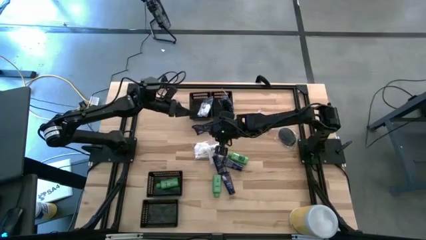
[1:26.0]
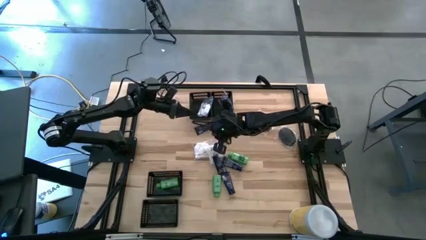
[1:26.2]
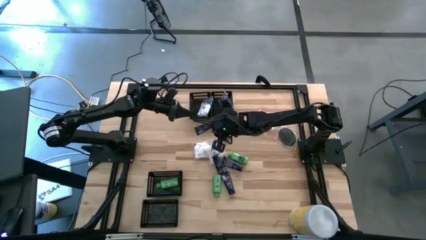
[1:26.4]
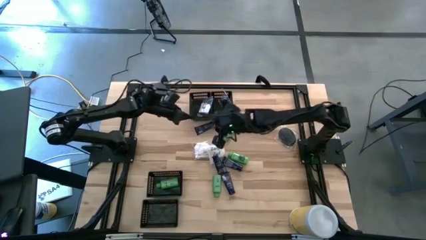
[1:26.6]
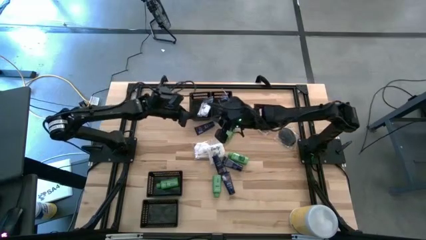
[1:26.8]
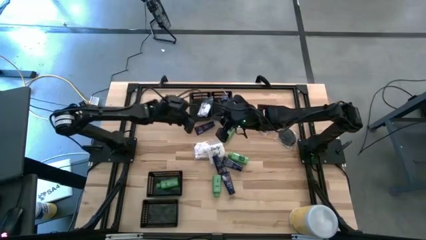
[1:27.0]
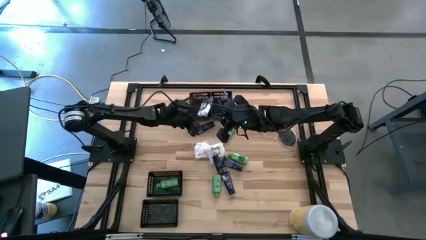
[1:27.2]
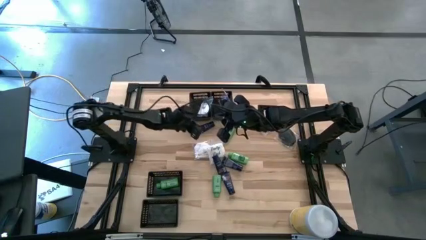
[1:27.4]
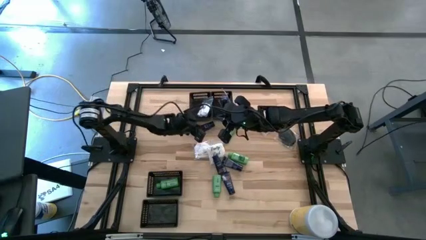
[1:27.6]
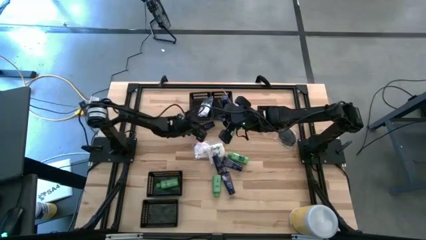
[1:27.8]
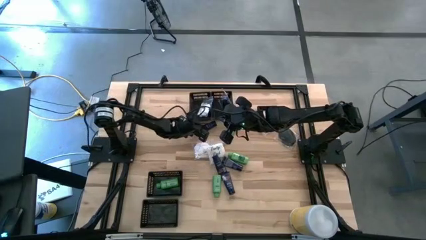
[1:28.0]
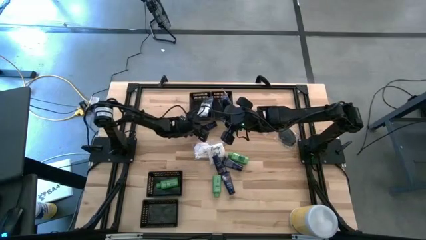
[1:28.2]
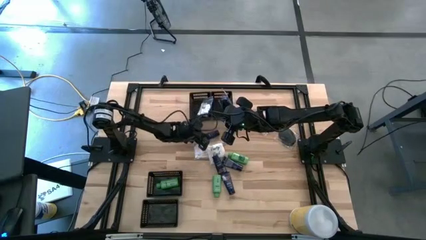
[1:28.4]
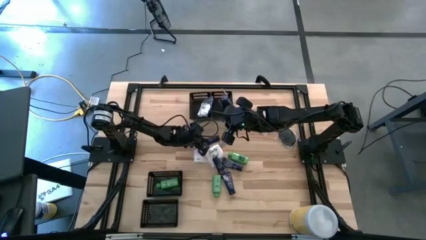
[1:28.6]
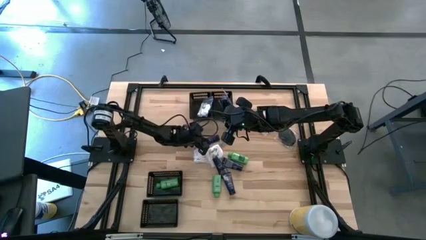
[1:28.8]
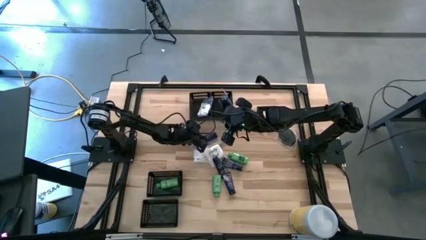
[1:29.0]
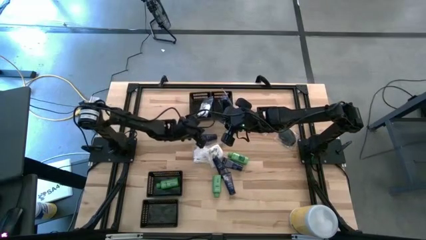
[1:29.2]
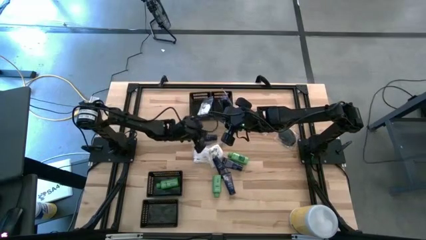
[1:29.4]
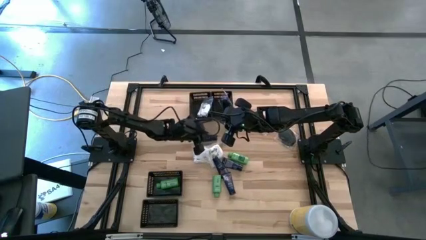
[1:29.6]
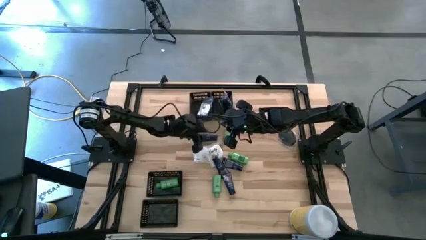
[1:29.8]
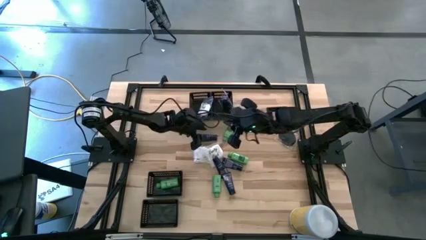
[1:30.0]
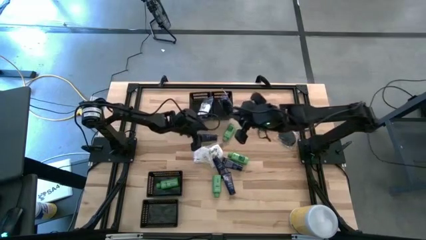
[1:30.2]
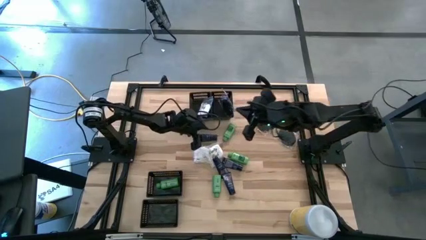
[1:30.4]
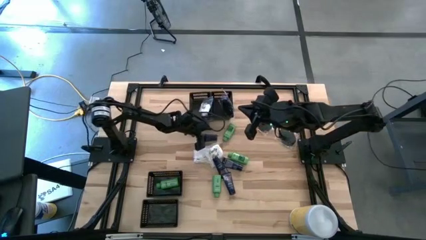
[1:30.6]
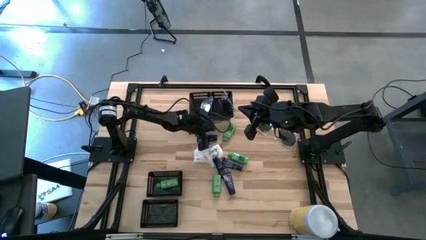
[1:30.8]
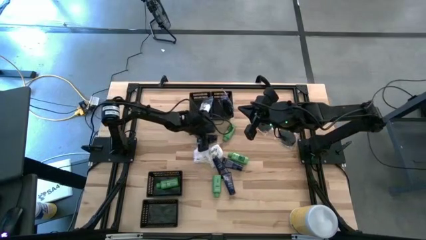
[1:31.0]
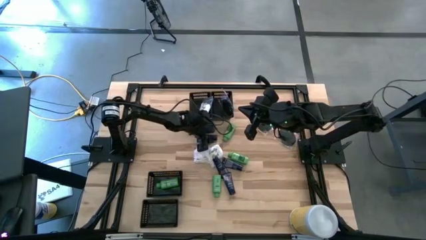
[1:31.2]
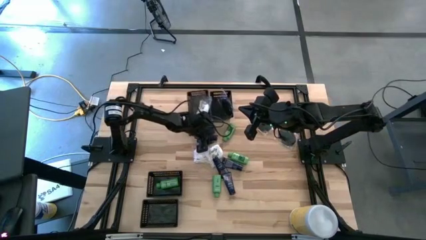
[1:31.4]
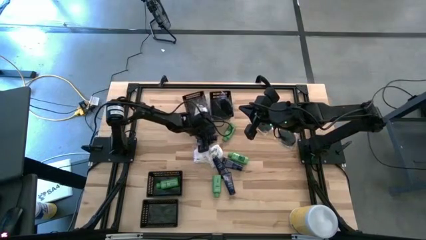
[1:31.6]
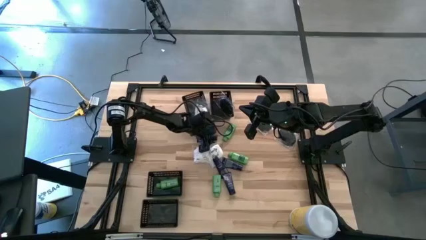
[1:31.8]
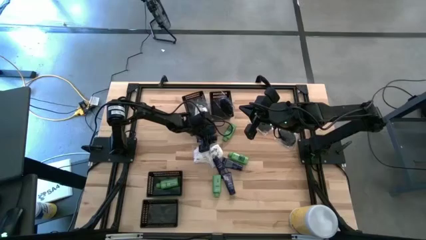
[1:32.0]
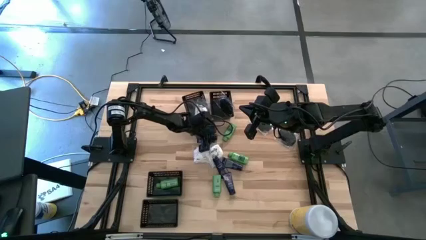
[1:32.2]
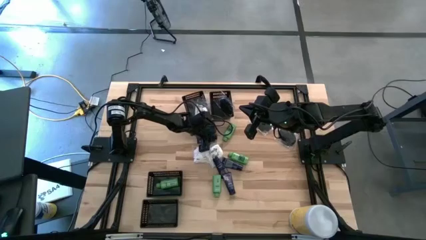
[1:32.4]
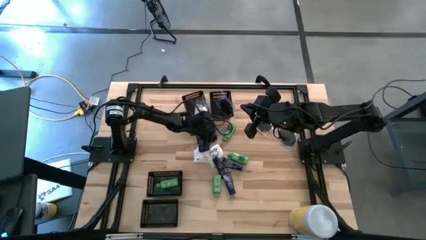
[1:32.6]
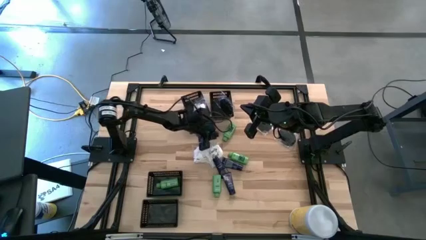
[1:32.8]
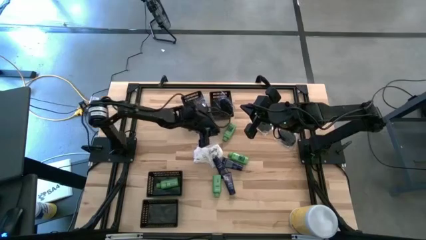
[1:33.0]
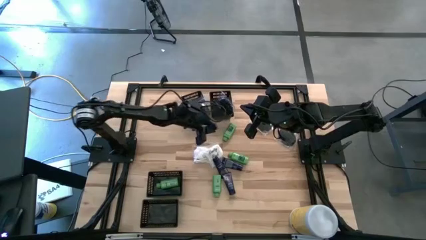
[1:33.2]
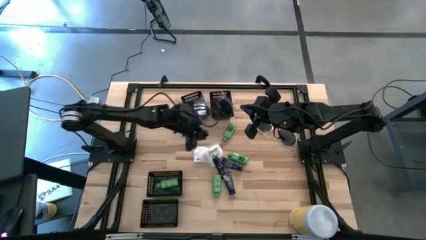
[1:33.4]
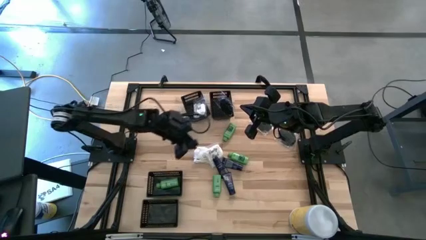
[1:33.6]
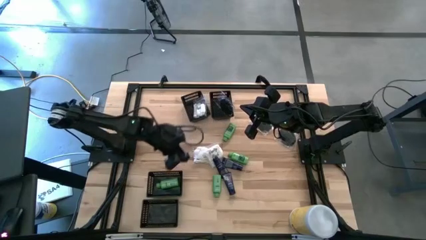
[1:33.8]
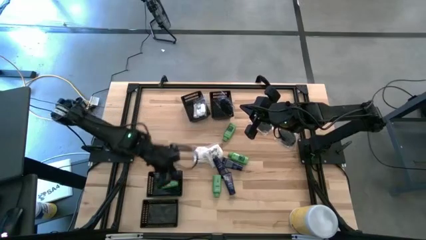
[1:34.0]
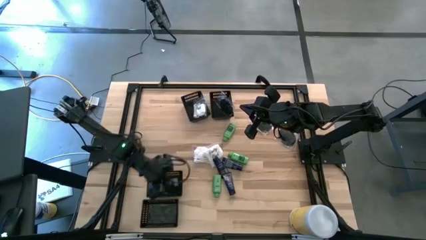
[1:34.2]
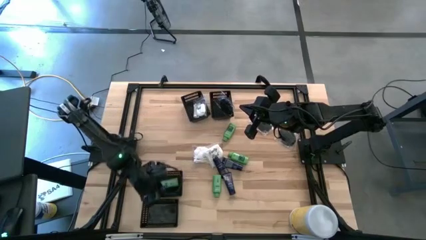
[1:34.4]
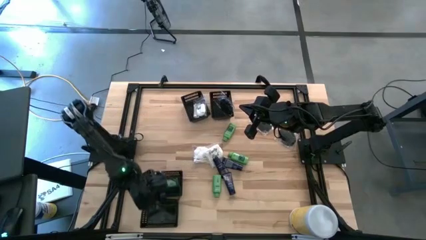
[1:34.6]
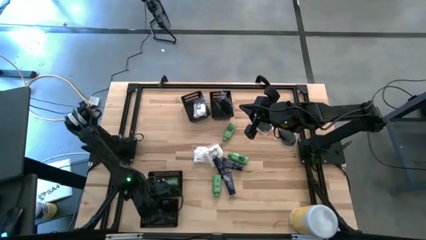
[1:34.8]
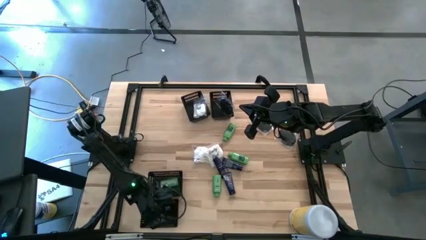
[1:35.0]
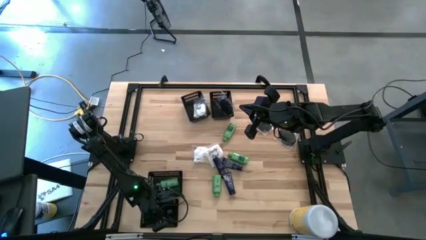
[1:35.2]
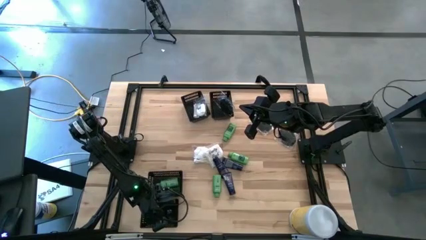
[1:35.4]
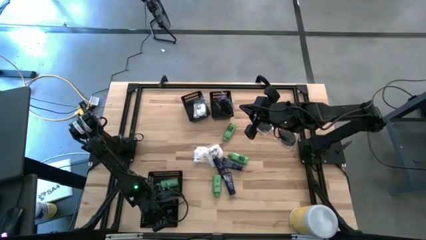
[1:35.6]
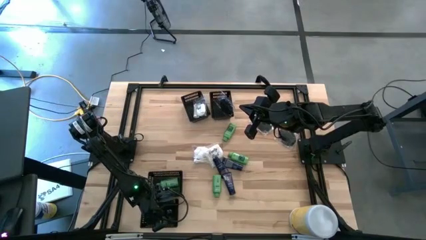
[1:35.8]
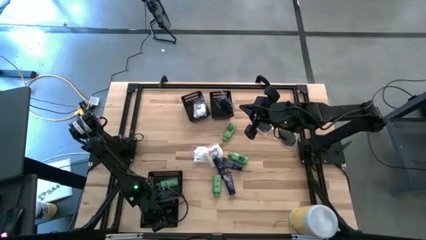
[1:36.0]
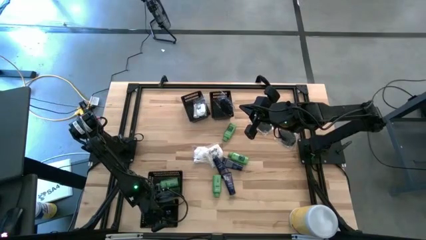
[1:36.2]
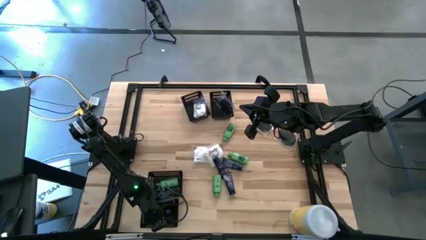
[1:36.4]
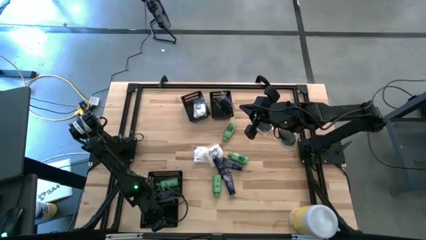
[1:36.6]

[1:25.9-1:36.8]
Task: Pick & Place Travel size toiletries
Put the dark blue shave cream into the bottom left basket

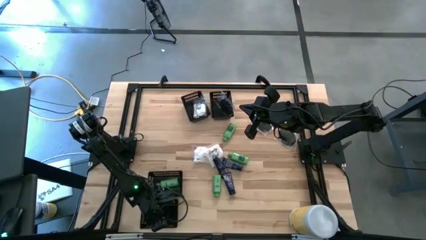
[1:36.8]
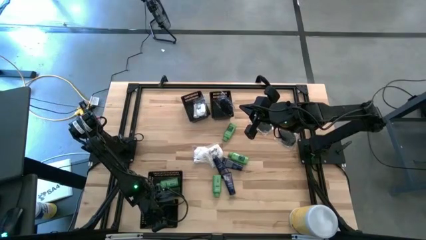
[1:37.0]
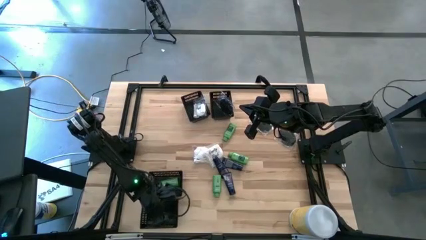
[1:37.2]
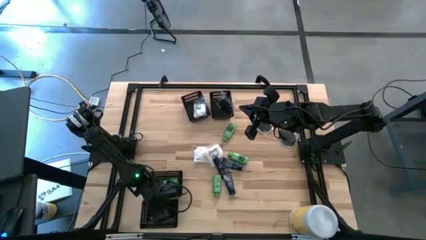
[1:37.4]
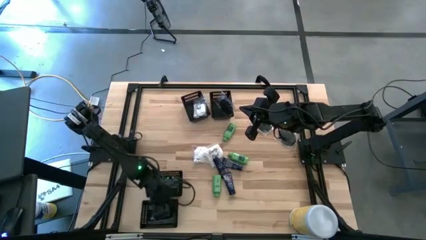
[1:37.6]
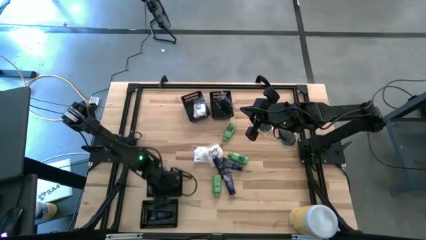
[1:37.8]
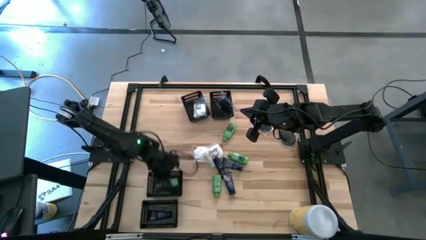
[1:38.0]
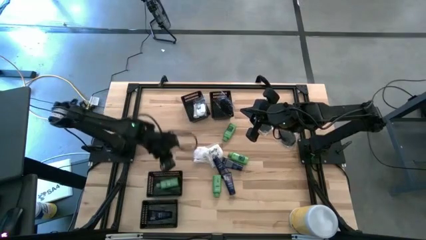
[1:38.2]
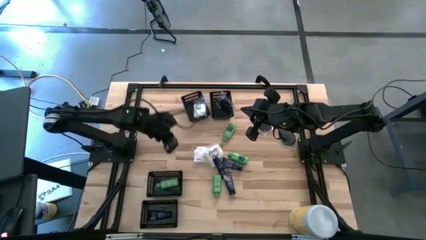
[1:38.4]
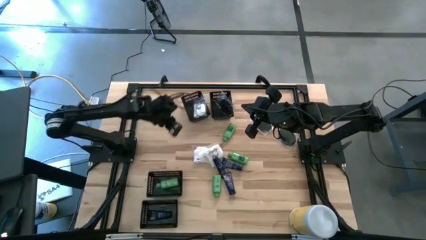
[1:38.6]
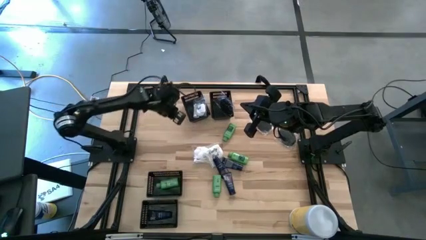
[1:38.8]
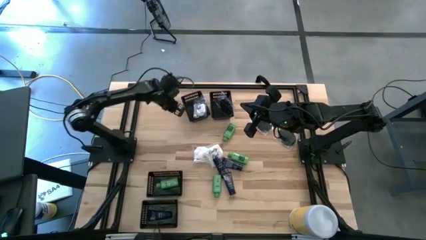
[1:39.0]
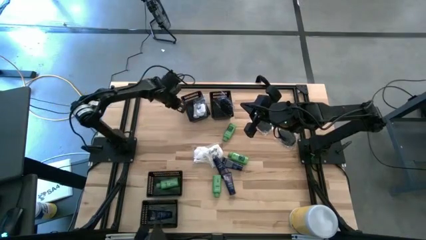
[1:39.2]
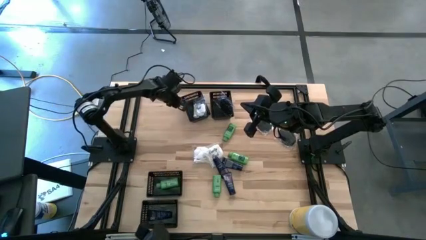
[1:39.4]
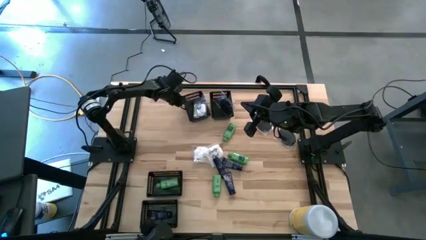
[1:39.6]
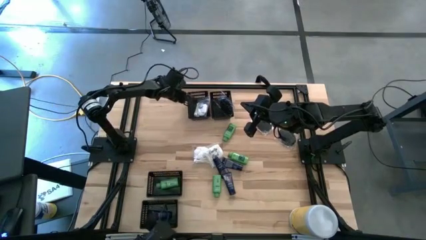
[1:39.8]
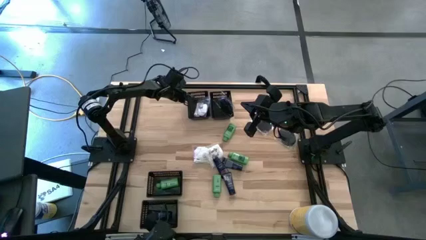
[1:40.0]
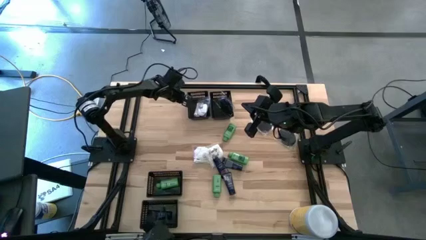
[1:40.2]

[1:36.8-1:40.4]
Adjust the top middle black bin
